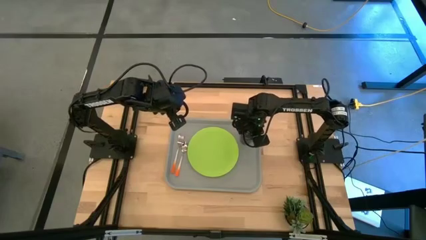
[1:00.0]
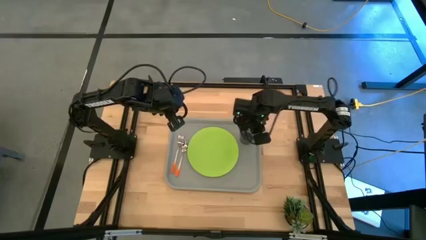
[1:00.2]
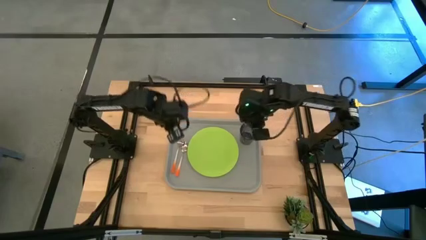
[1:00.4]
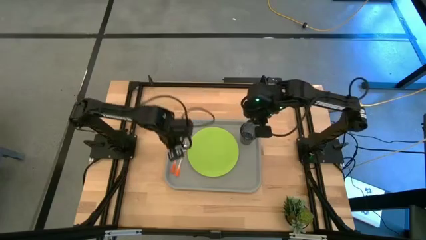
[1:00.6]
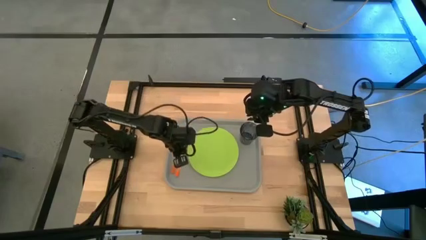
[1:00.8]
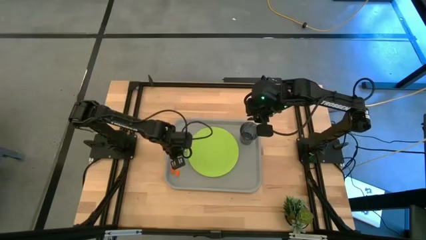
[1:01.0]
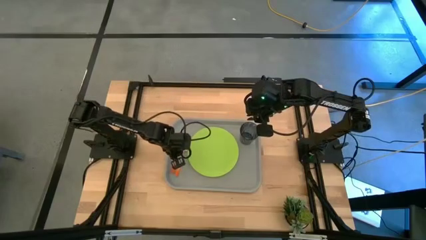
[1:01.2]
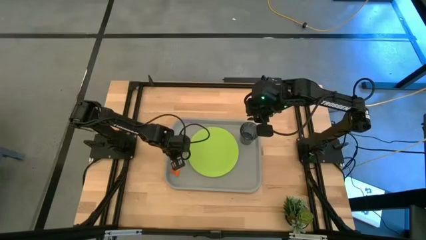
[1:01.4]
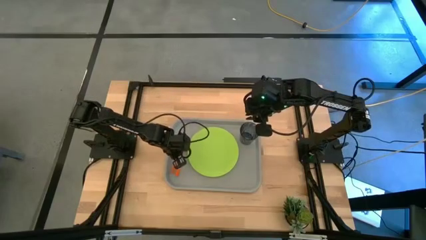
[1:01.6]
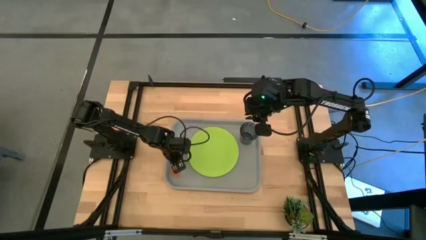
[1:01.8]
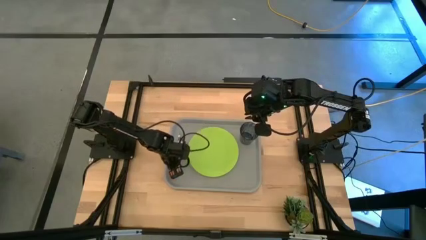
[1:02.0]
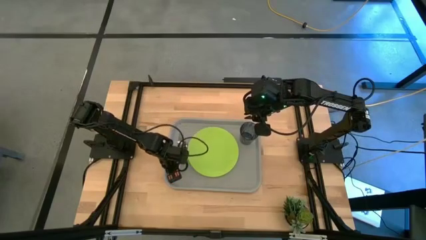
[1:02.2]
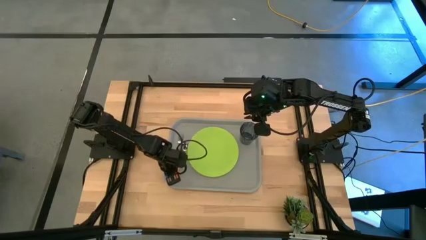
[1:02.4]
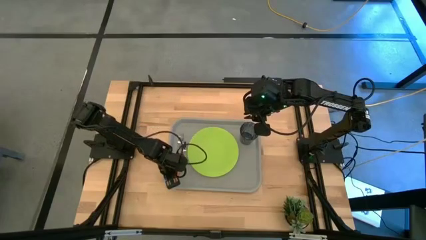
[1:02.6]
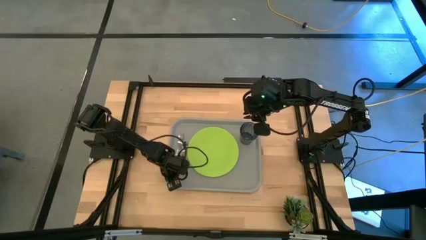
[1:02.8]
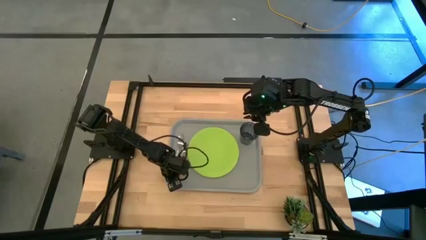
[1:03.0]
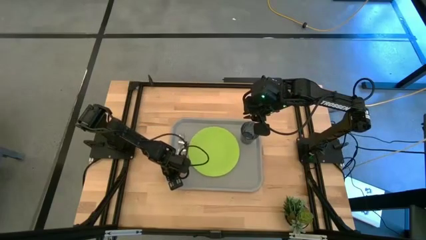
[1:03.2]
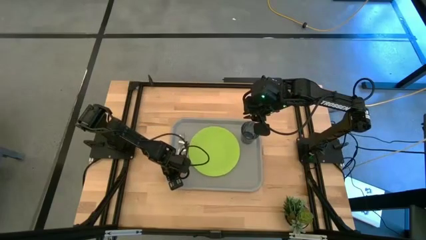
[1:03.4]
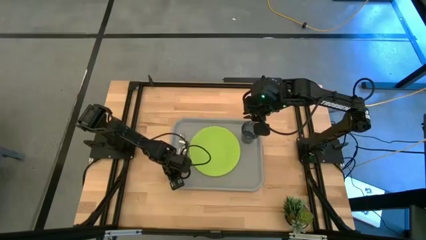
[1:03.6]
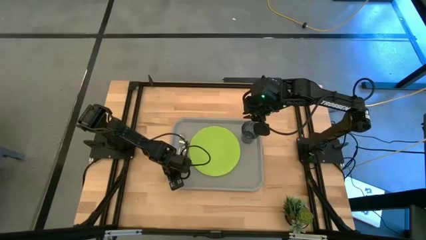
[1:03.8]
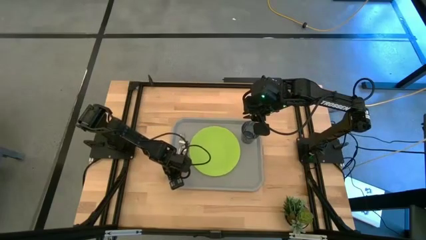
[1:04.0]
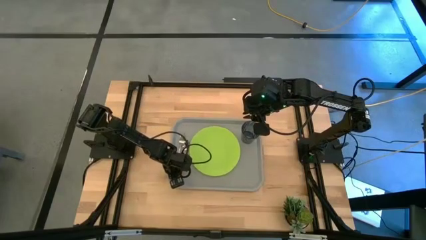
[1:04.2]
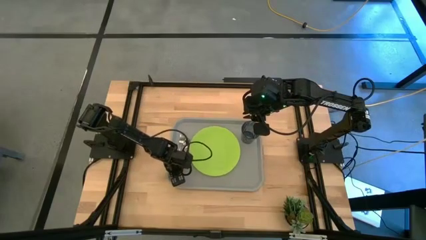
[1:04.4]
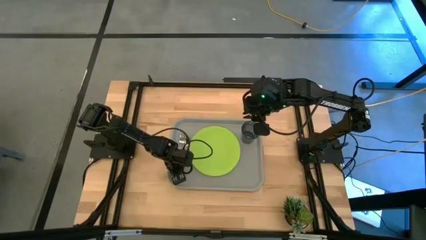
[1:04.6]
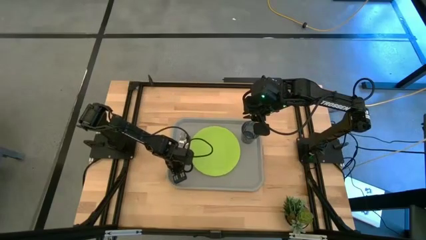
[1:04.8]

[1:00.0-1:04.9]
Task: Pick and place plate/cup/fork/spoon on tray
Adjust the orange spoon

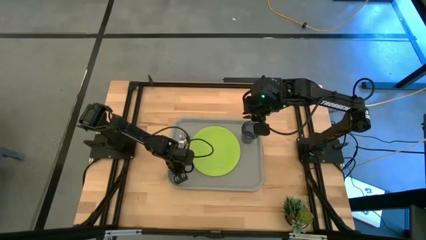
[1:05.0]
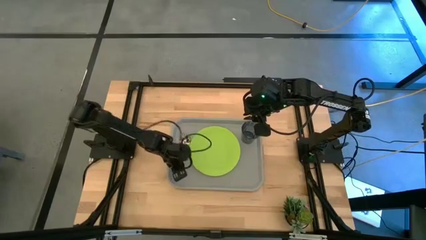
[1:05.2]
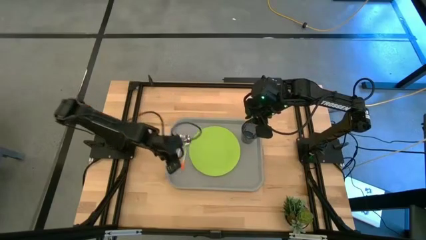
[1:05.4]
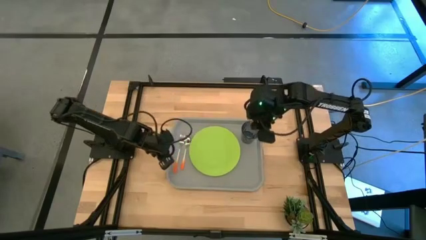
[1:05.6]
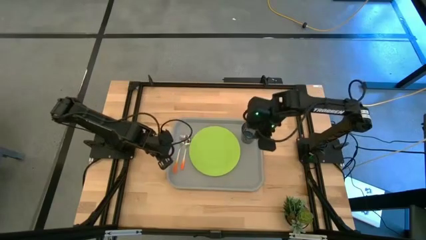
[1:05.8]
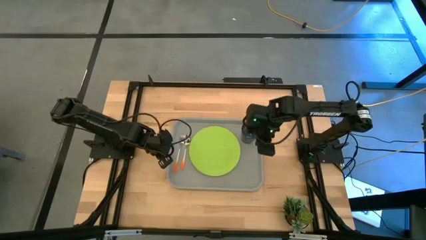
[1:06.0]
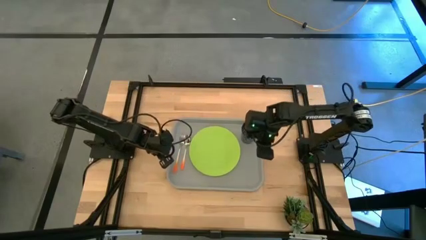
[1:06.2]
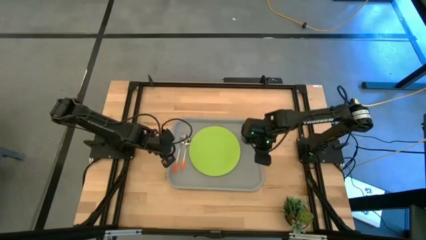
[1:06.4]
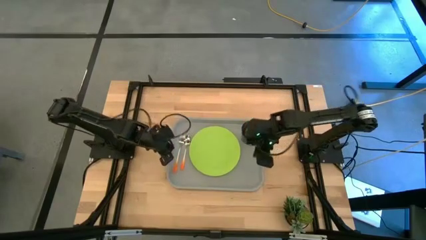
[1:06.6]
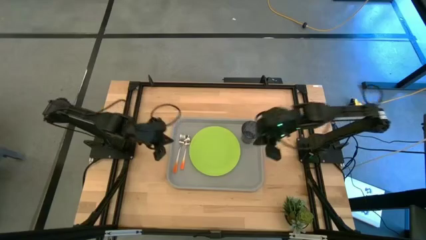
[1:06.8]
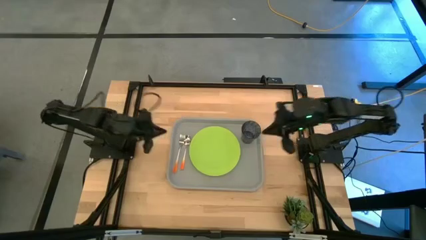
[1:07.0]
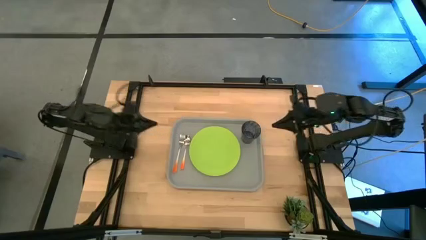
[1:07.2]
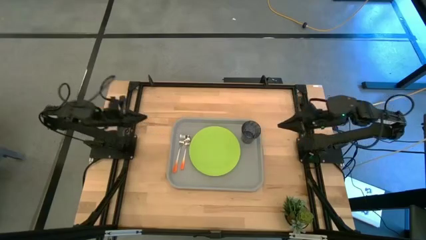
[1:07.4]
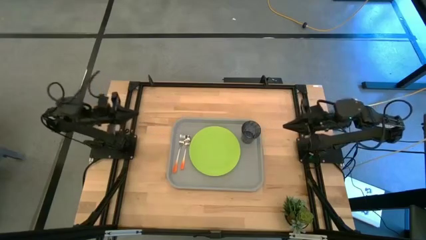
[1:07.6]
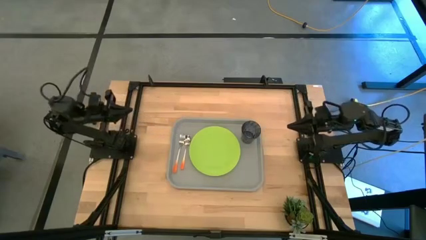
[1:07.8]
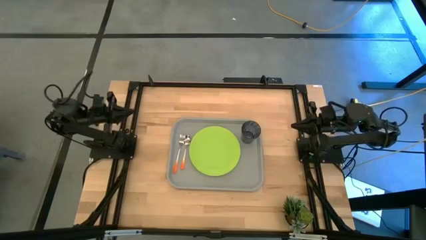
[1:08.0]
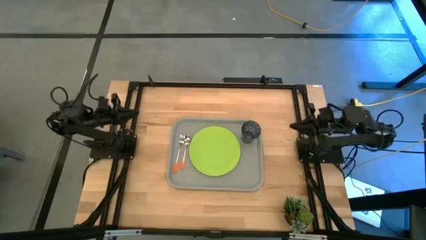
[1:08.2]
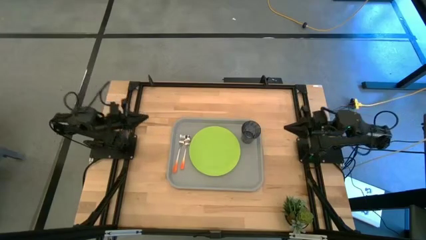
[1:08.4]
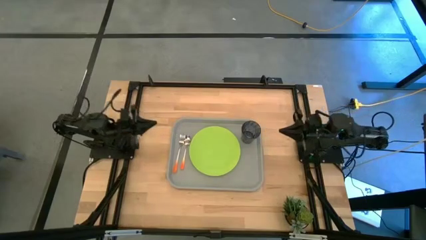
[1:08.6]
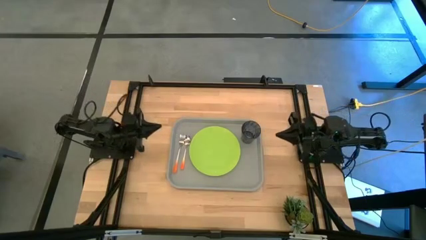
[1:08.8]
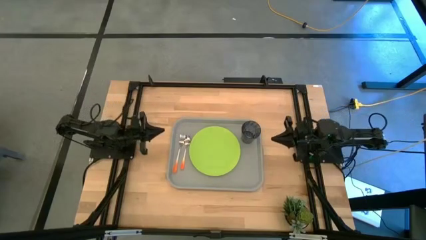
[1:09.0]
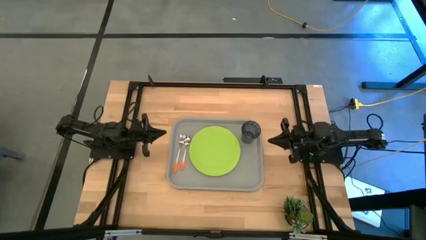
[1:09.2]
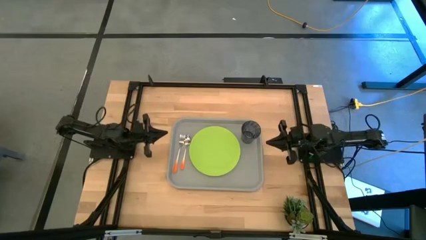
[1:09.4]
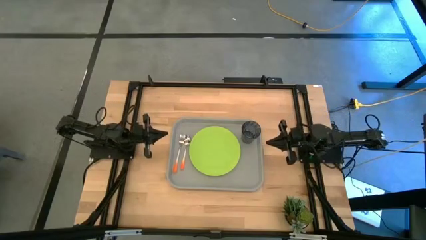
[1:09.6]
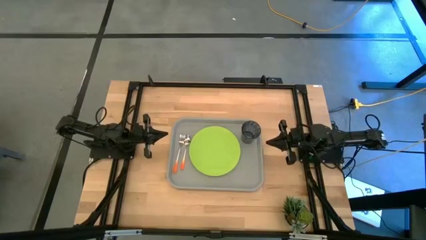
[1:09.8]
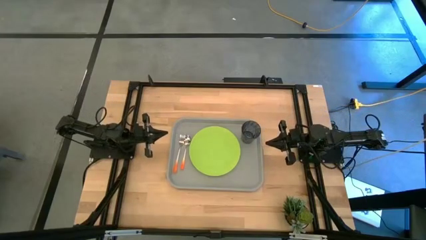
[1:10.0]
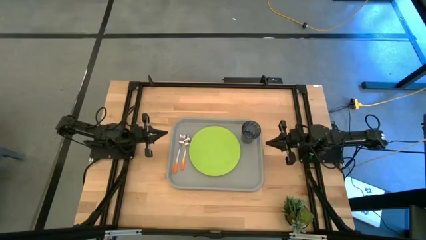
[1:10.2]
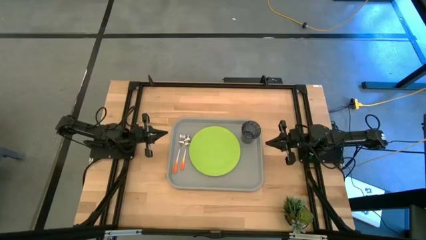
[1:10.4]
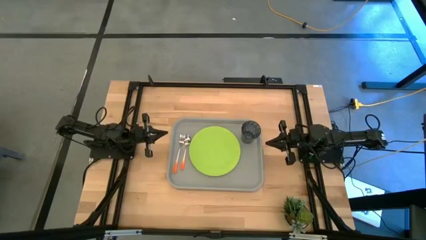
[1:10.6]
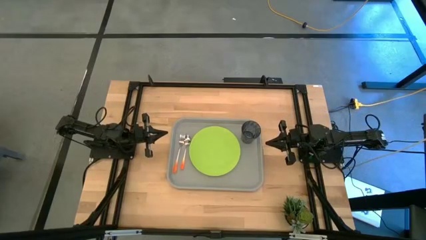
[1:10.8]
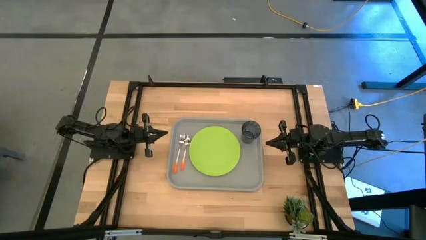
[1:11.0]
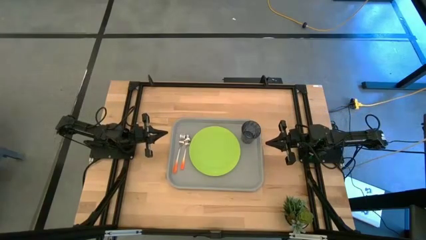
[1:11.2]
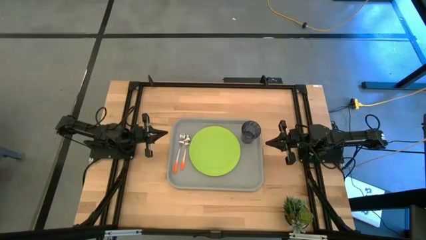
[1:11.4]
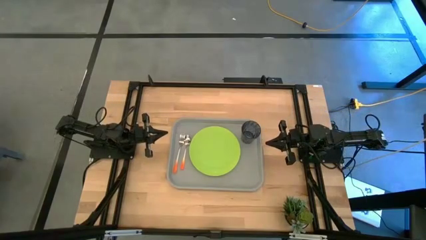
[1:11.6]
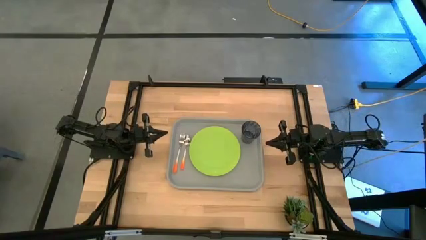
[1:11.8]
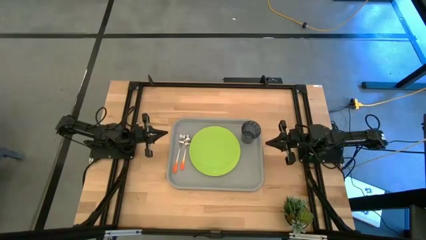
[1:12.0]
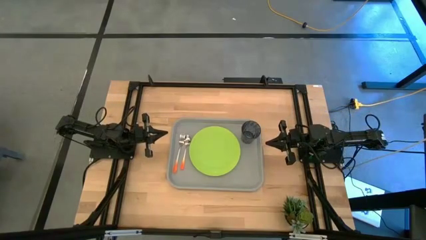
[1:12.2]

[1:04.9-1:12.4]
Return to Home Position
